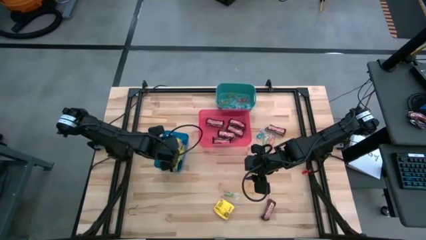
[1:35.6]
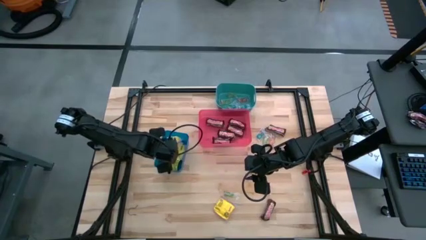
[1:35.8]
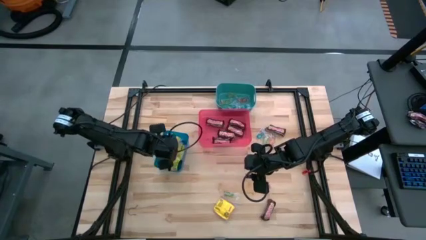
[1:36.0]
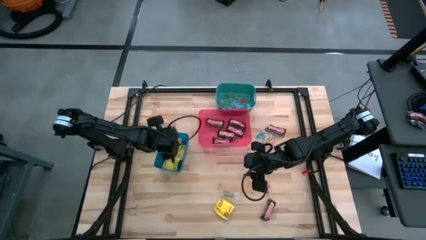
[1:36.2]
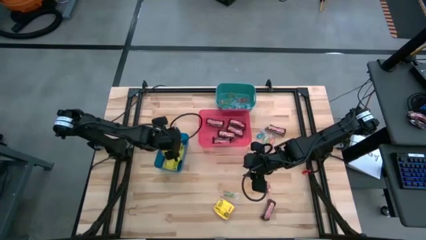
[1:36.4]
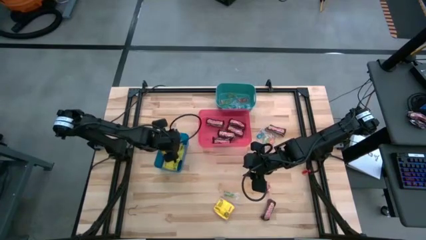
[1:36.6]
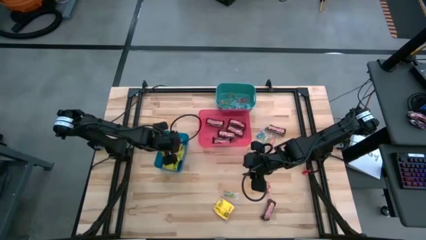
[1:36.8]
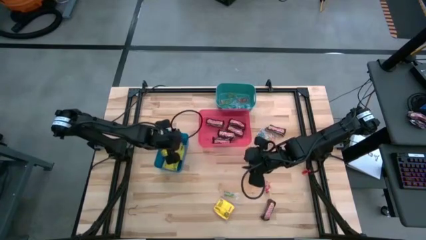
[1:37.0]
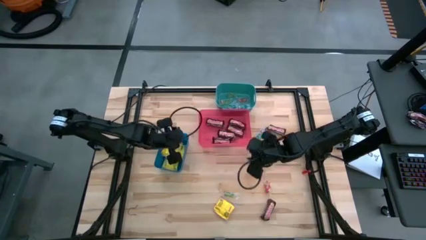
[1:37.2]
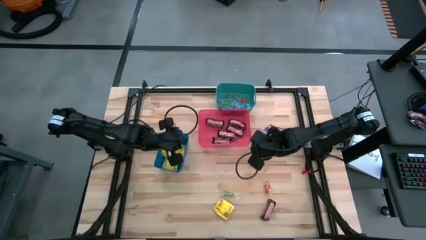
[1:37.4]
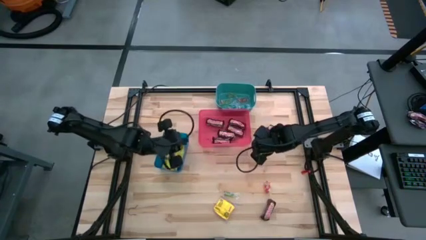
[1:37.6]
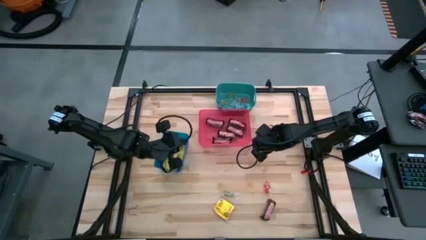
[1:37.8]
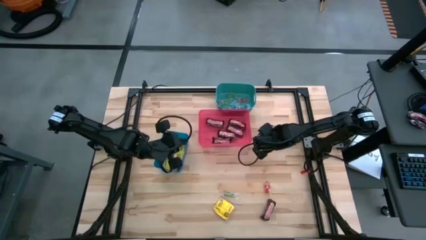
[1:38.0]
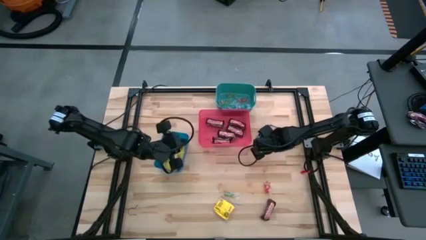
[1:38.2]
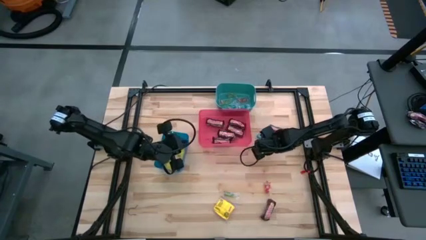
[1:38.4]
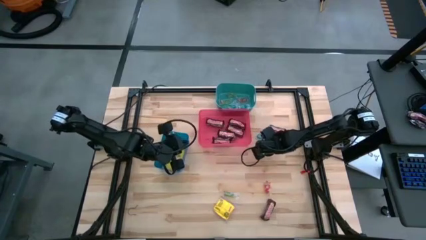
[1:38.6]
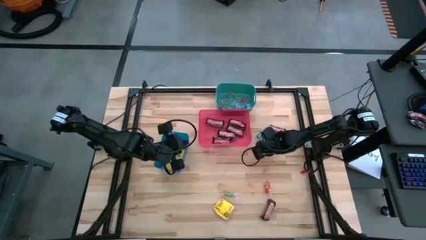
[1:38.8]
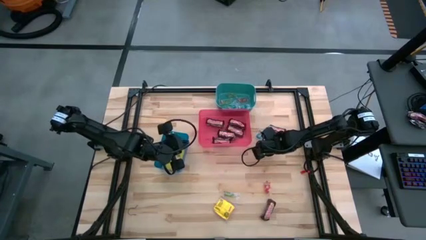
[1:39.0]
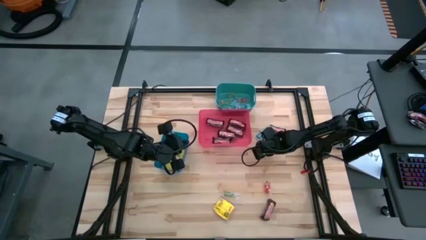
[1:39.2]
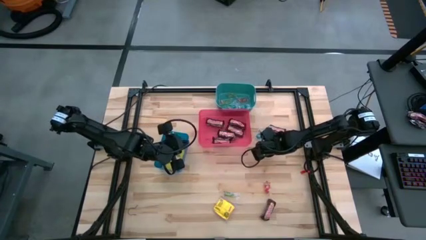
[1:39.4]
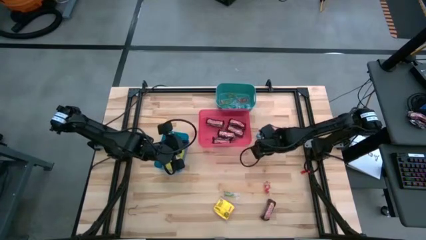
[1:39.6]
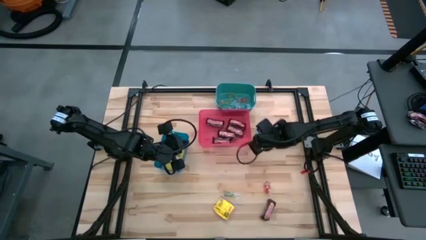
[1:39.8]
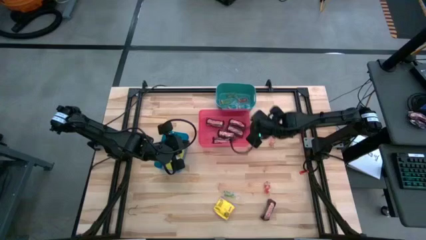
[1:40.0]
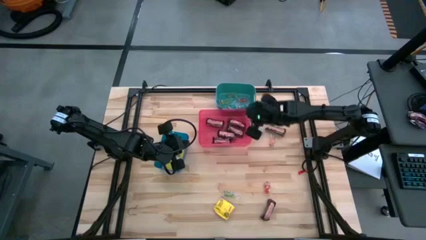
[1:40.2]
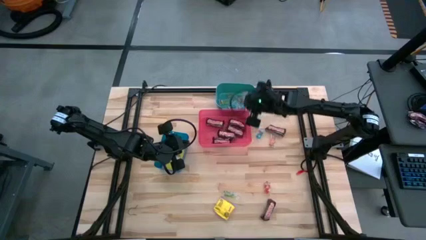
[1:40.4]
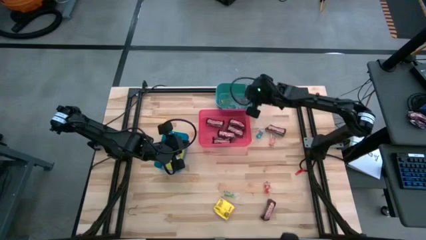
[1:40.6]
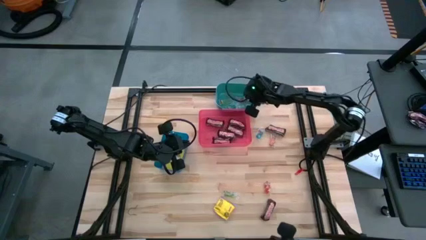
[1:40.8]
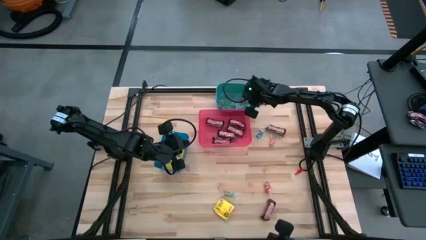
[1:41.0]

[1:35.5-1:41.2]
Task: Sort candy
Put the green gummy into the green bin

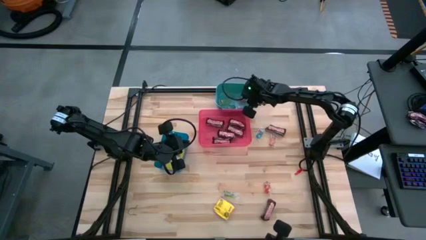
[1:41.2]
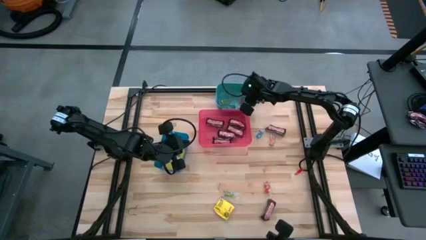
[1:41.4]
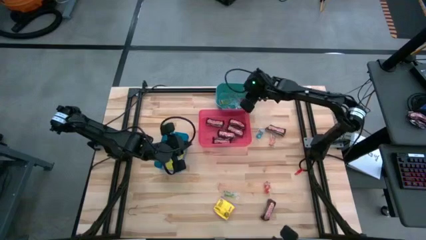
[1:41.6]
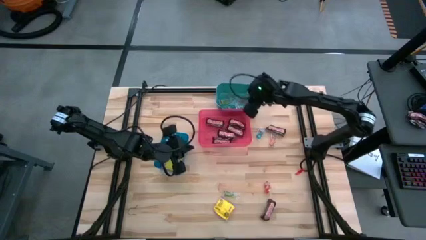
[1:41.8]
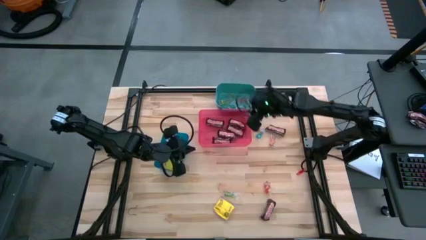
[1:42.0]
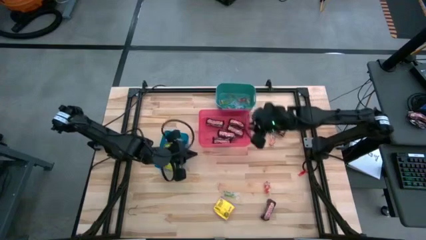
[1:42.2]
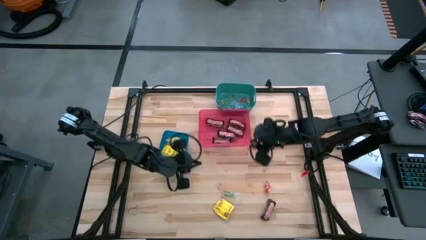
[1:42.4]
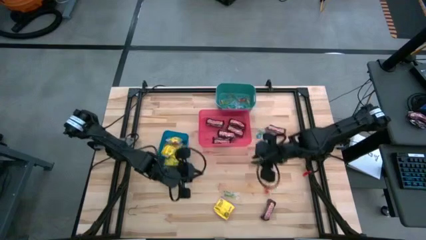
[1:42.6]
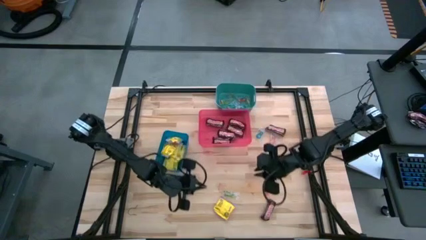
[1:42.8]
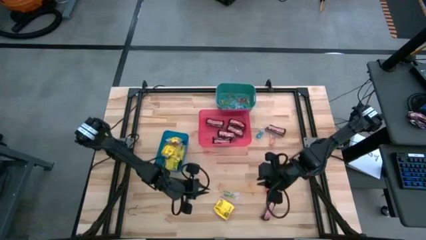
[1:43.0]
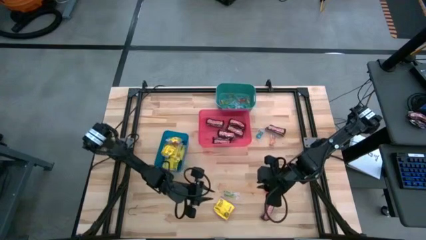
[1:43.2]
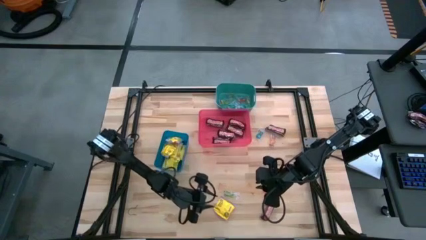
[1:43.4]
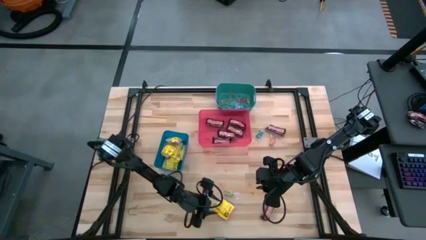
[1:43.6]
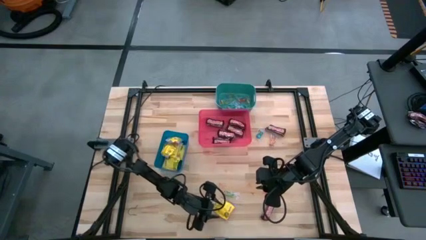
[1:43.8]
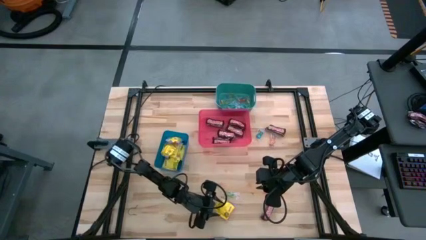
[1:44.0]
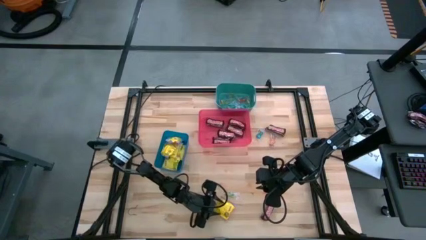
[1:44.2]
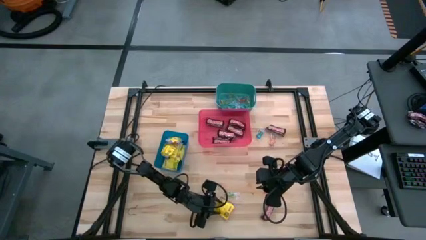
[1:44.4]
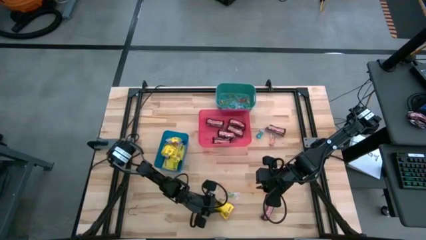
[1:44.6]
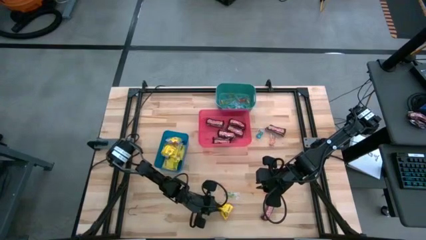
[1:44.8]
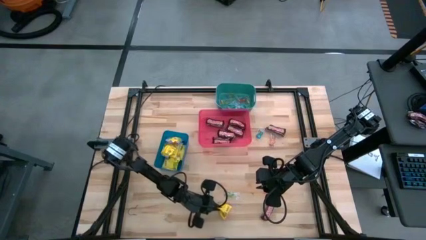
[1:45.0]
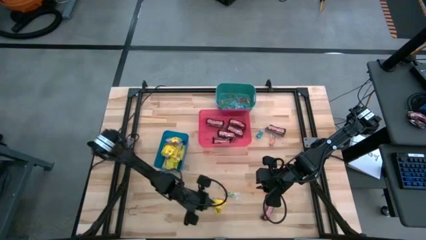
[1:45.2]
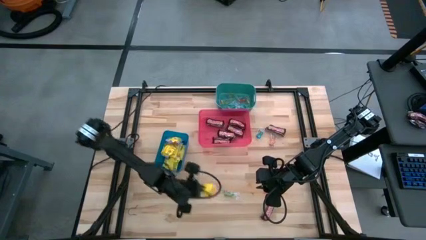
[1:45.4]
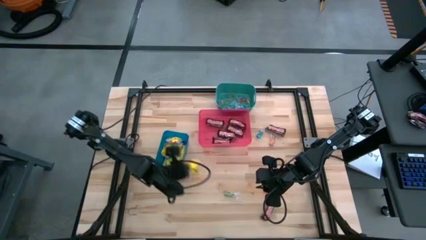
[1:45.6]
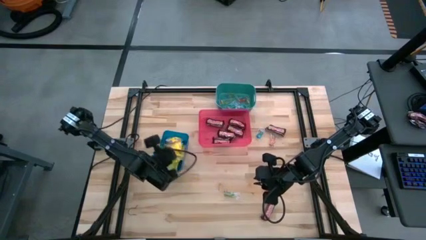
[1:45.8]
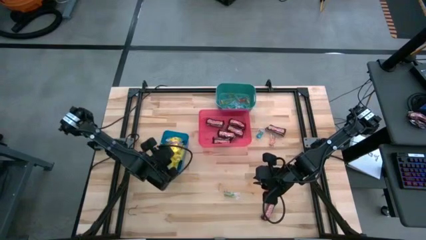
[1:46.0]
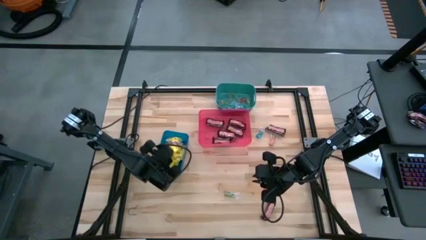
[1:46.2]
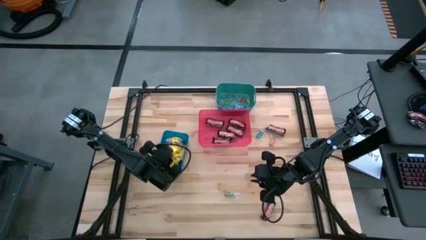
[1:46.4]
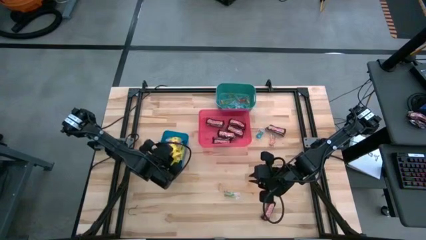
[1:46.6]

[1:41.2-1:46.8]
Put the yellow candy into the blue bin

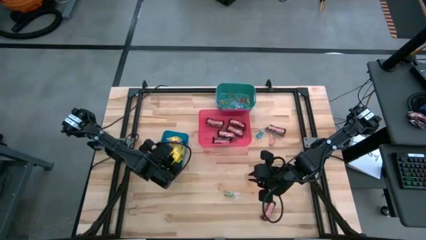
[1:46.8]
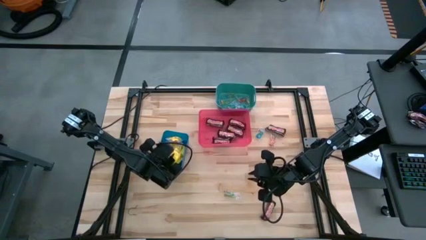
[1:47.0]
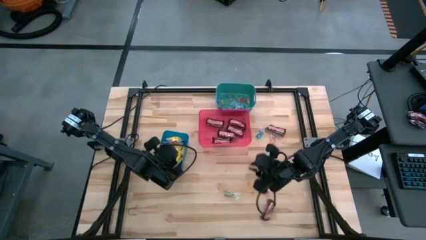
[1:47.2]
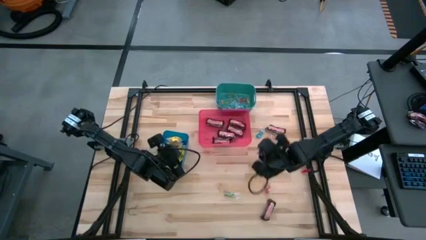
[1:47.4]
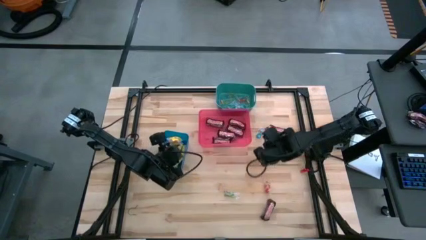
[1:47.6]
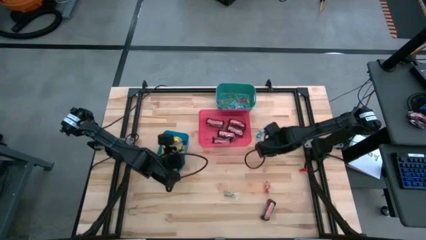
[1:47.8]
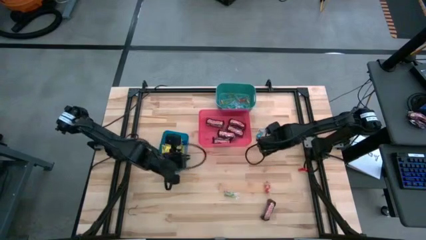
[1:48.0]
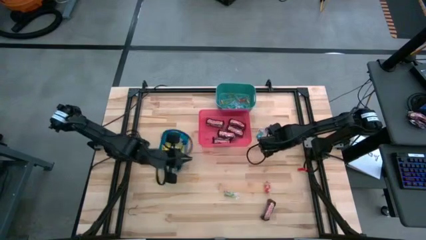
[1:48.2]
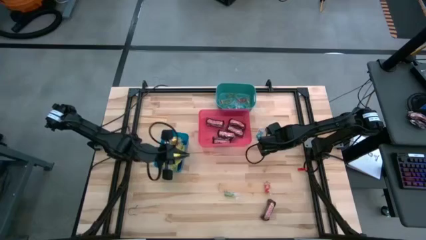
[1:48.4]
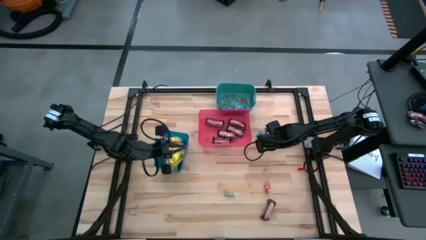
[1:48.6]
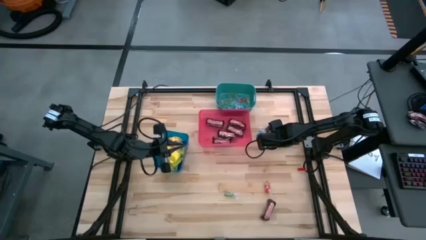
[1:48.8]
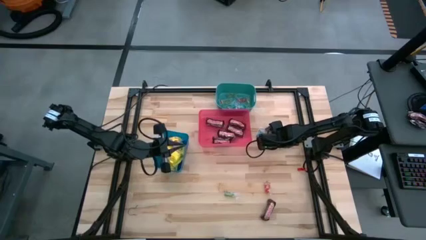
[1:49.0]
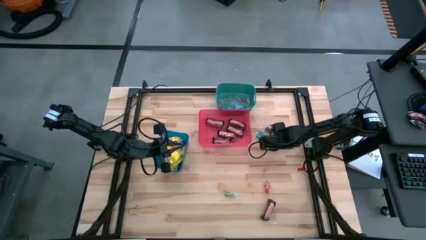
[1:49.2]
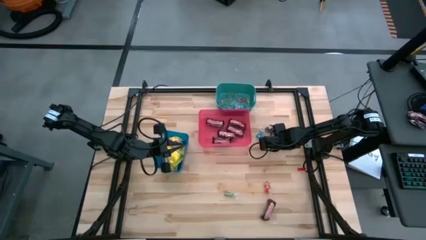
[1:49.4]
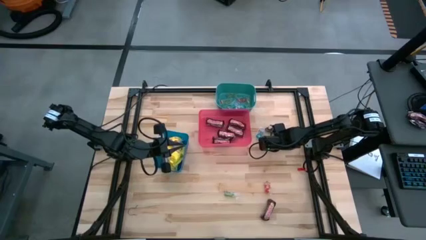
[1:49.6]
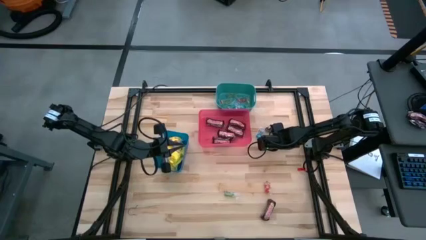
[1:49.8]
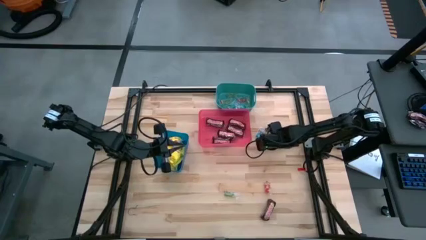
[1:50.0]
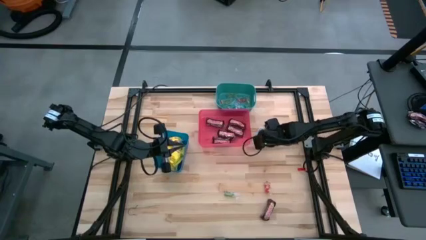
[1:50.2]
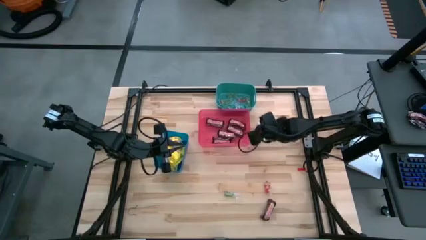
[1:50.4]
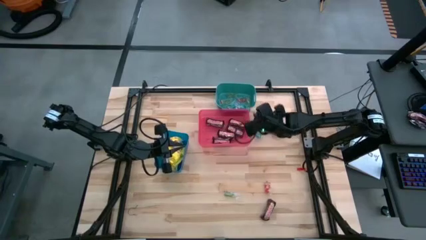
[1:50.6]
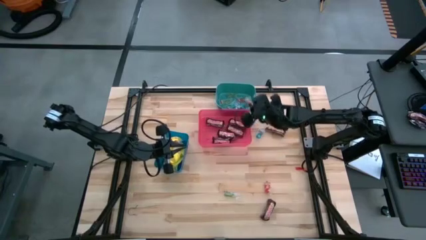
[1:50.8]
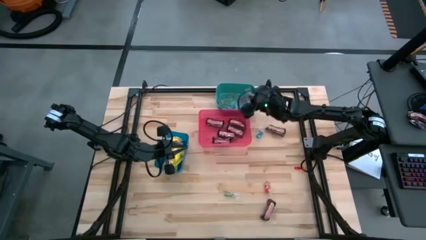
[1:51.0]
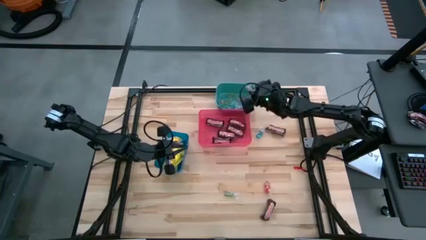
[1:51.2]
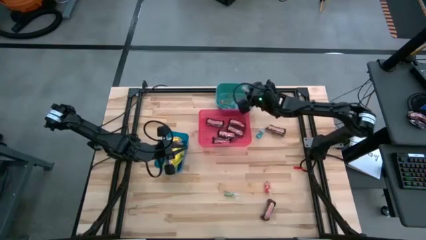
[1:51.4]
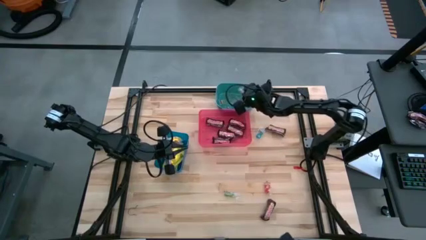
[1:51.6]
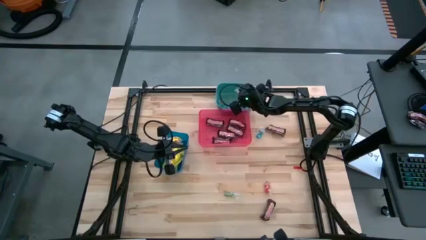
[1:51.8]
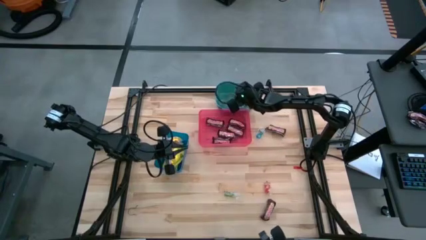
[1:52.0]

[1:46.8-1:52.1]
Put the orange gummy into the green bin
